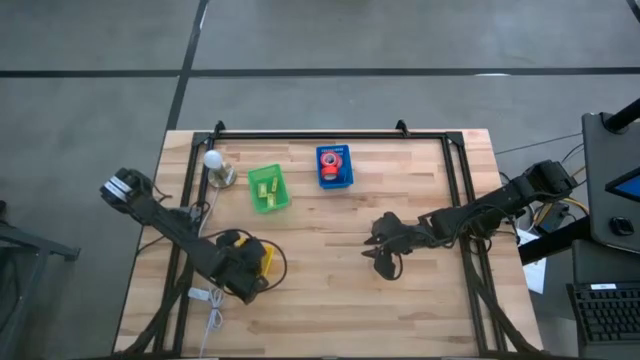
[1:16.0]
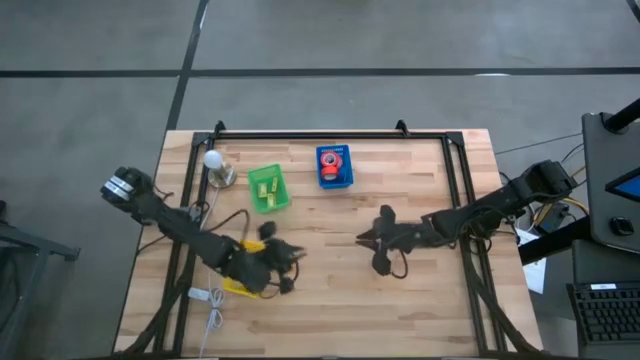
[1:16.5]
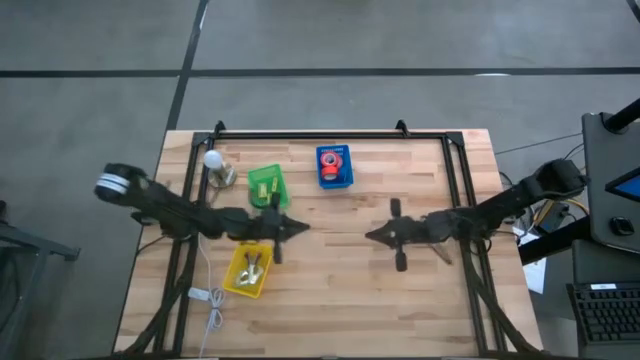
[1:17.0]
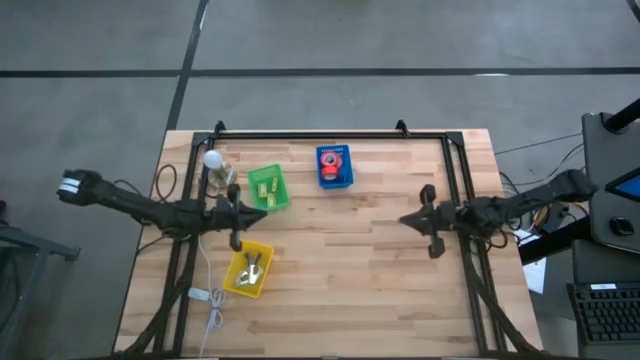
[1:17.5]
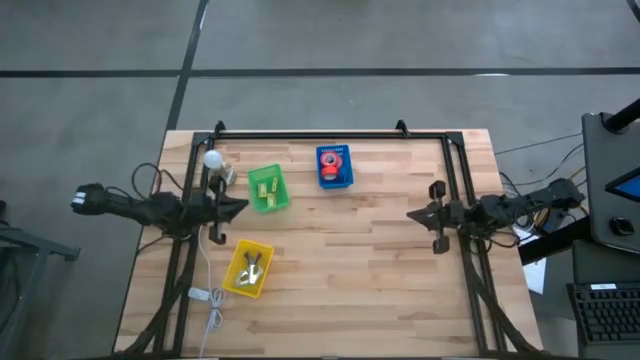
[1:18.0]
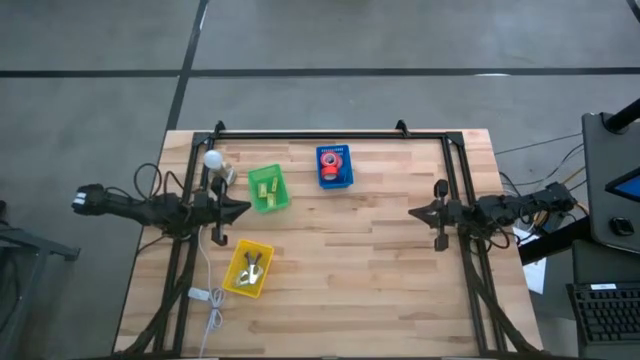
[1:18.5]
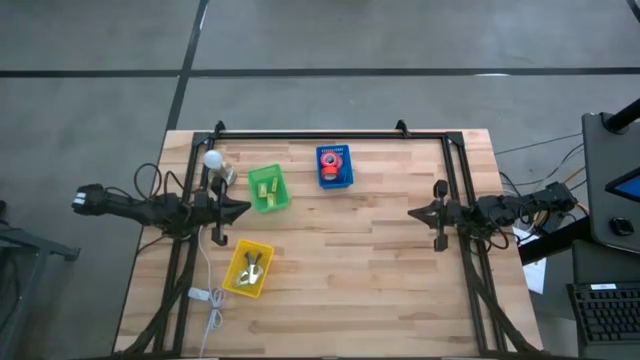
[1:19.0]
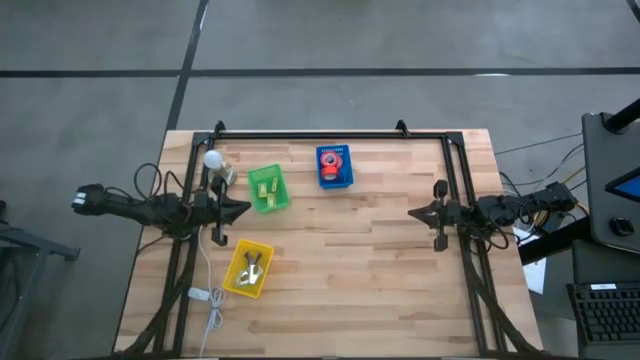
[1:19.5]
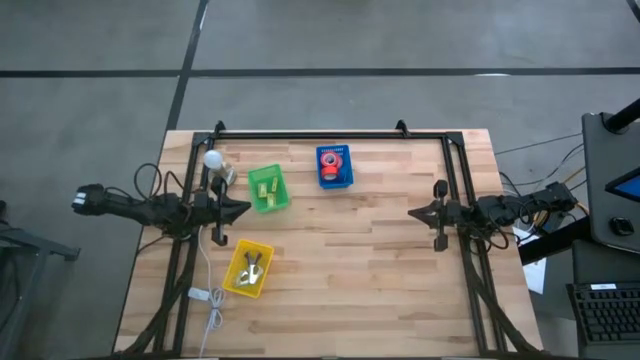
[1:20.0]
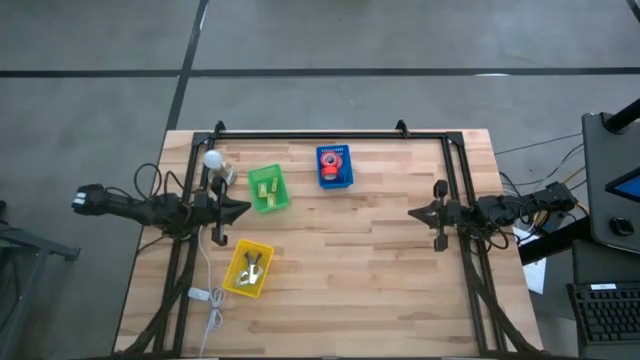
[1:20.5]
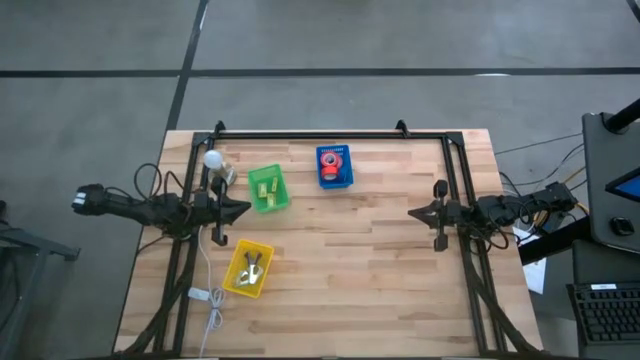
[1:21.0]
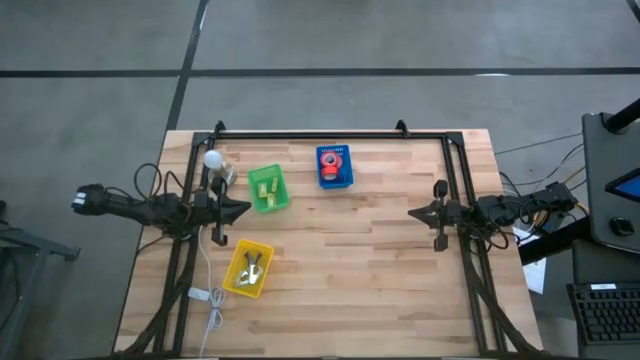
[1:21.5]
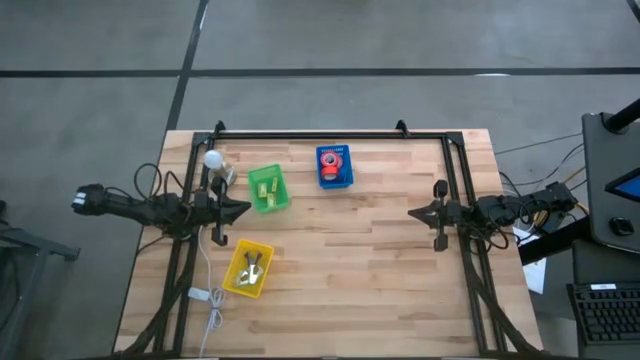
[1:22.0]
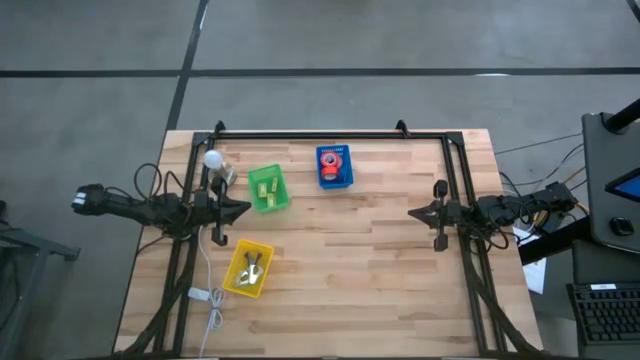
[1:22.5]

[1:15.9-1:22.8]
Task: Pick and place Stapler, Stapler remover, tape
Return to Home Position

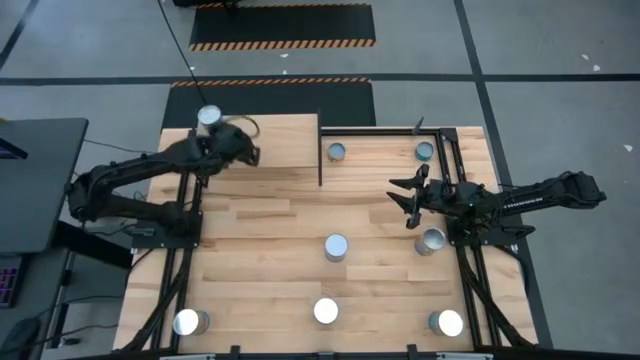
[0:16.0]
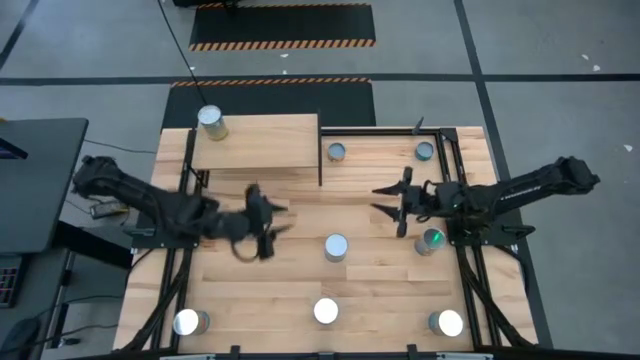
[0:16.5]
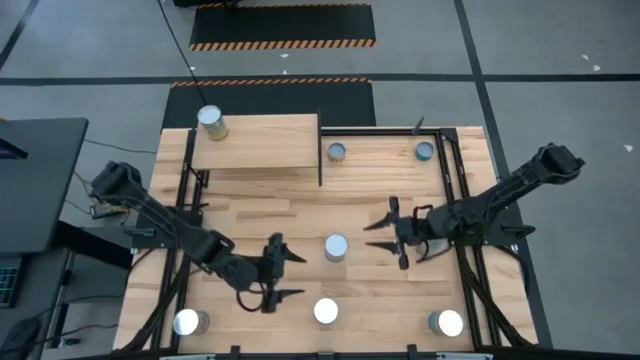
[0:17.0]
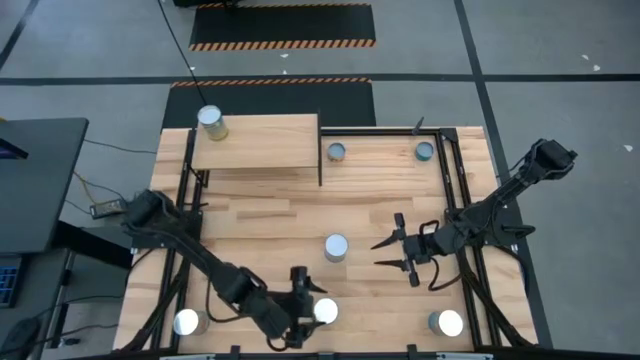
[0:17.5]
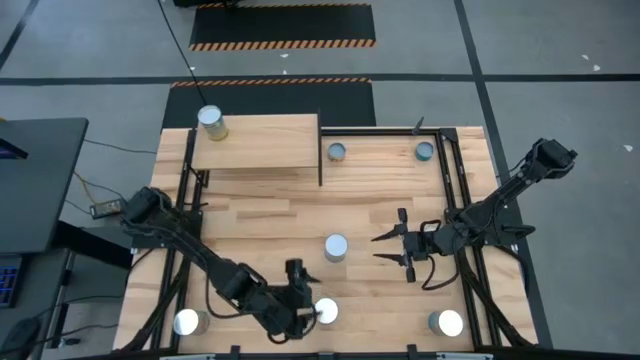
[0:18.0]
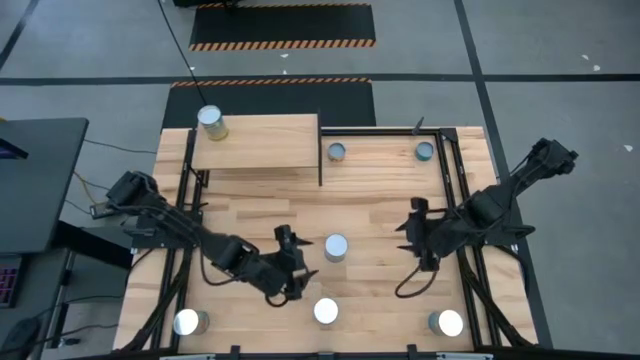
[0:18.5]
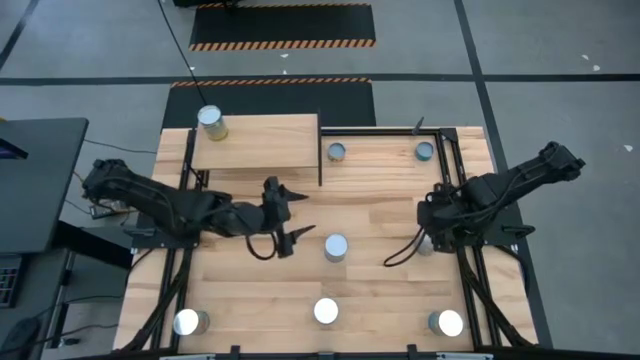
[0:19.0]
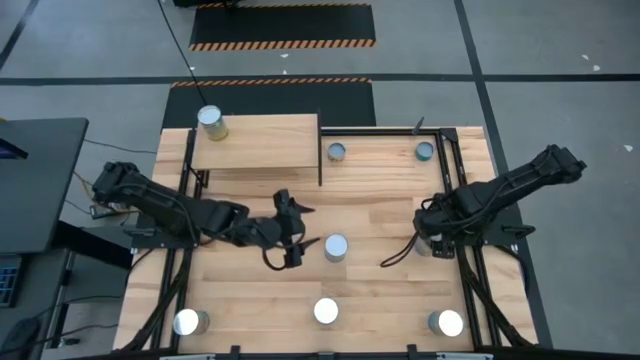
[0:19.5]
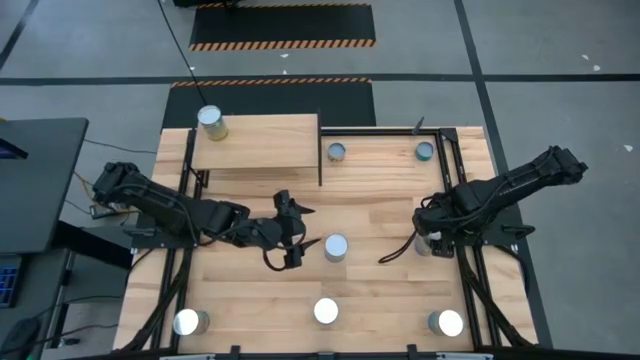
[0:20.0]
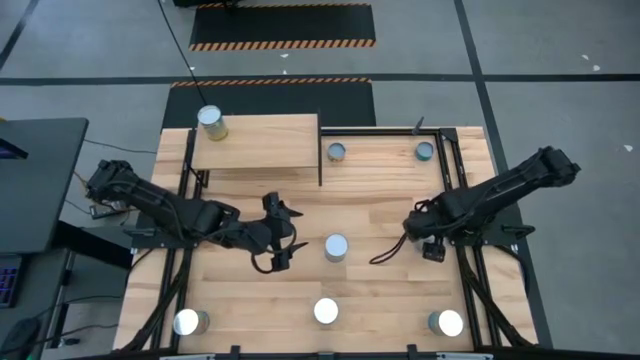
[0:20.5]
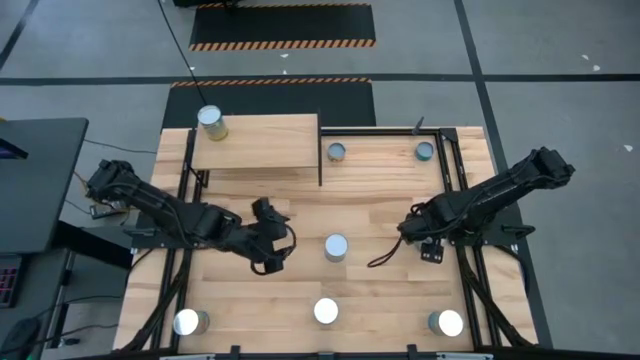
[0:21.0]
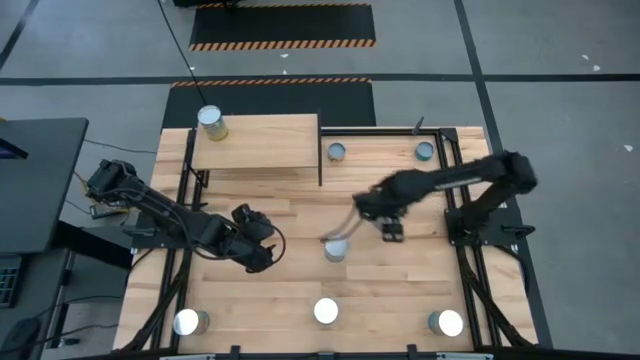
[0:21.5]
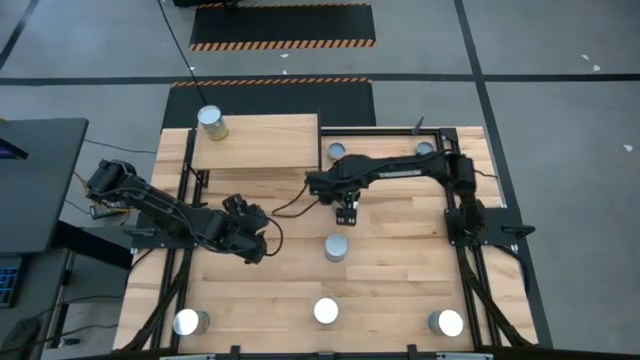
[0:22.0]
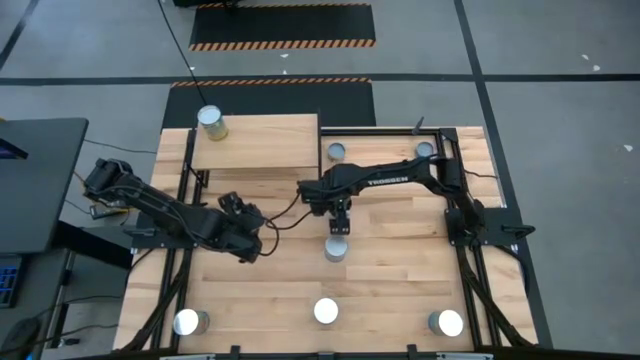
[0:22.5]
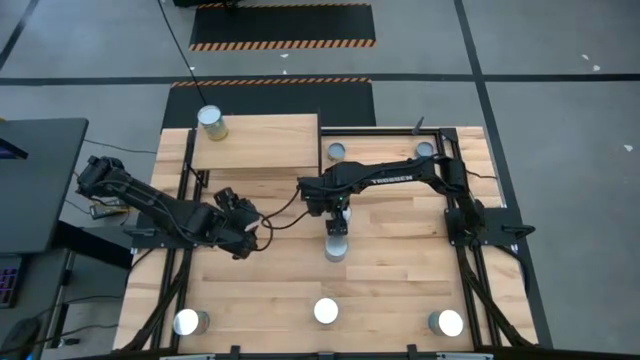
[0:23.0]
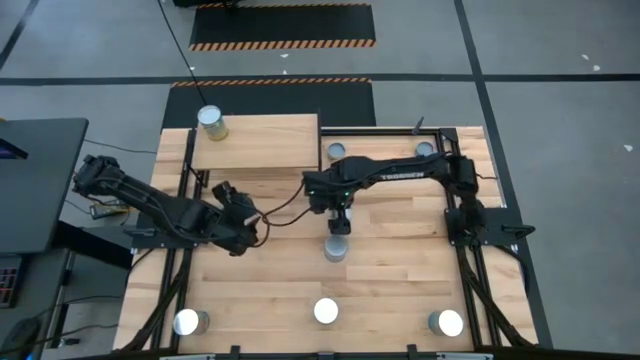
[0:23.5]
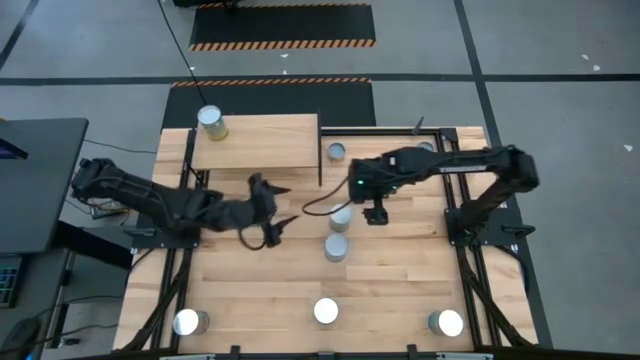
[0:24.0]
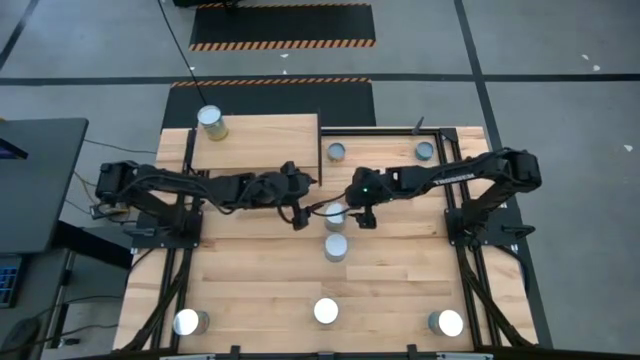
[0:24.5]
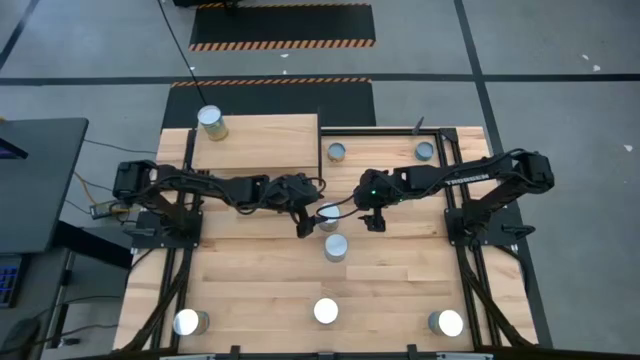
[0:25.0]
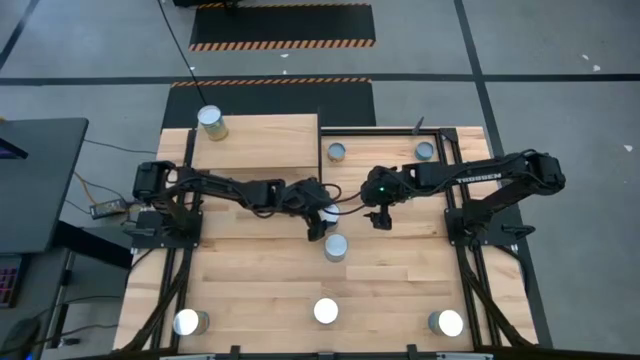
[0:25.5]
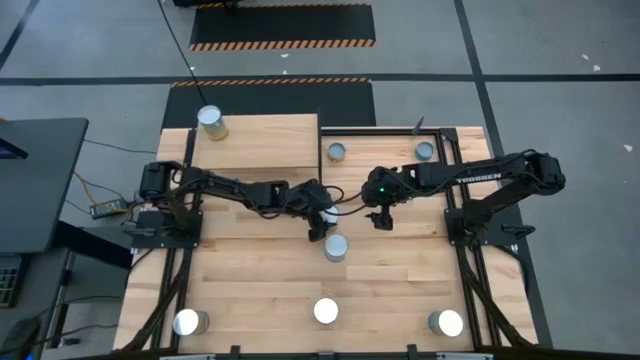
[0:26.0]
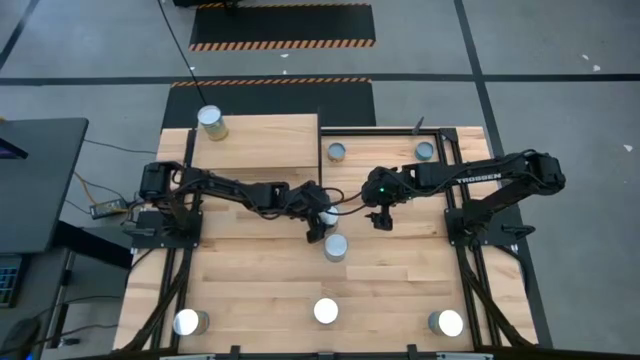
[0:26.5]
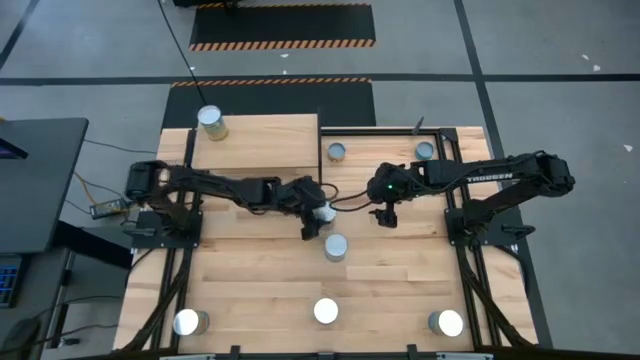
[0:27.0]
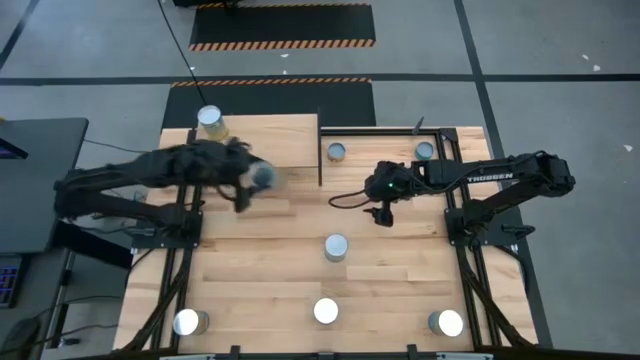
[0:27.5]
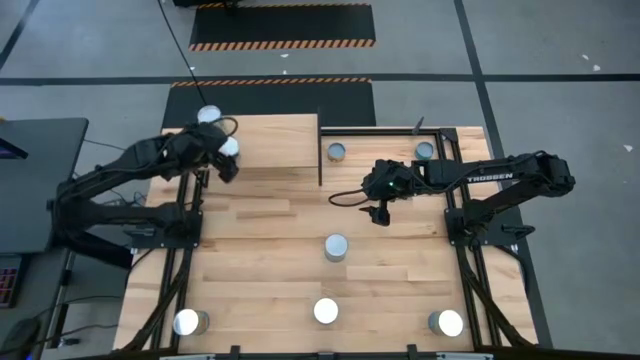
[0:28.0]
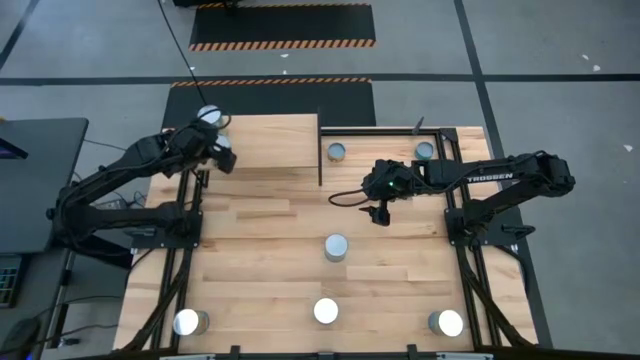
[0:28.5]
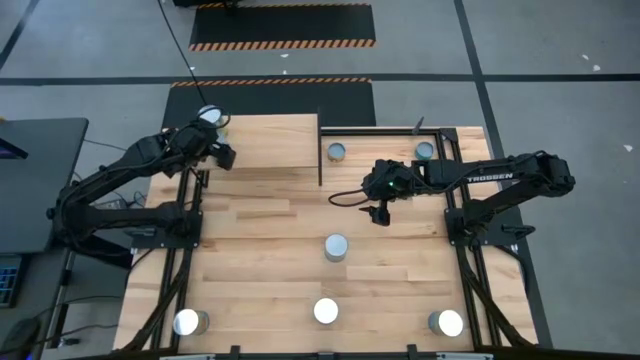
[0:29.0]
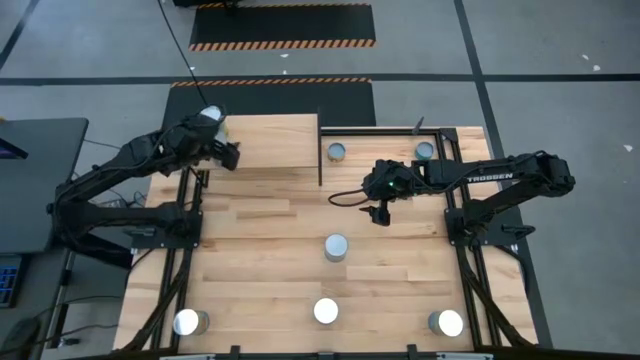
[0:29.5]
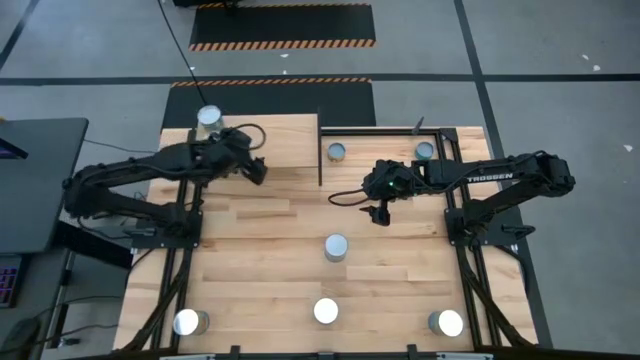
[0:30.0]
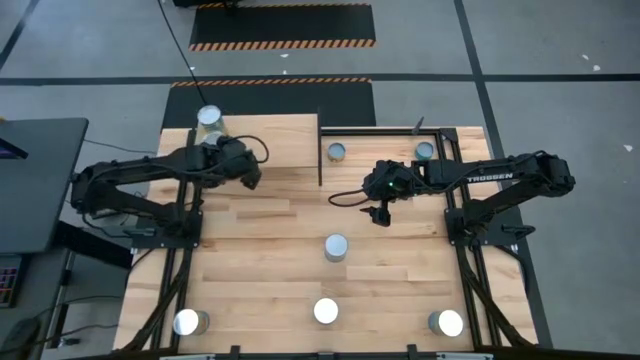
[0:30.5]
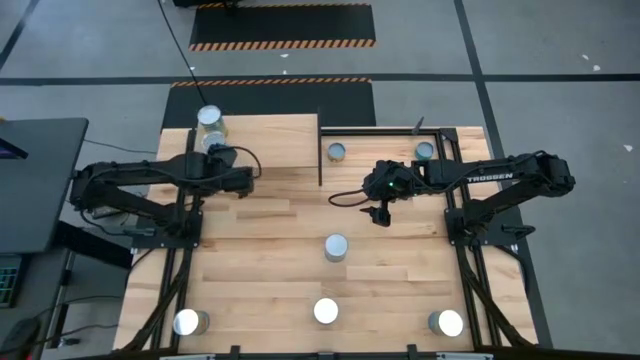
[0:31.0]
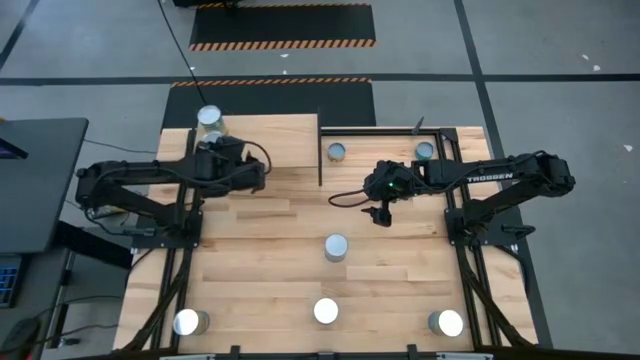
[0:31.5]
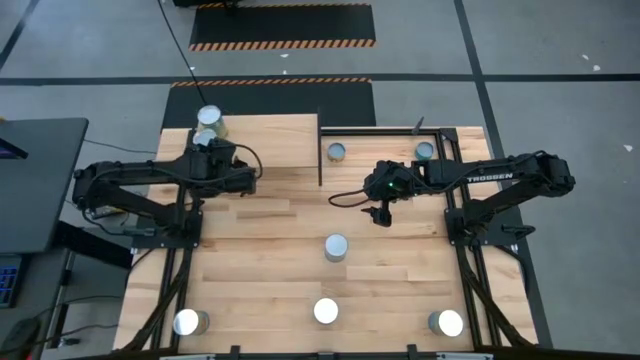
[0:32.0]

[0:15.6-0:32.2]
Task: Pick and place cans onto a shelf
Put the canned peas can on the shelf
